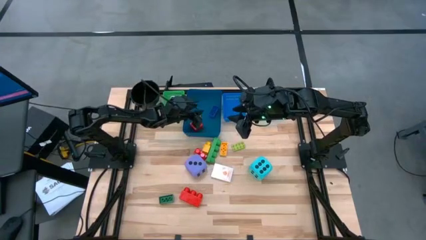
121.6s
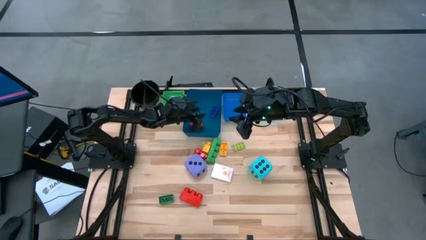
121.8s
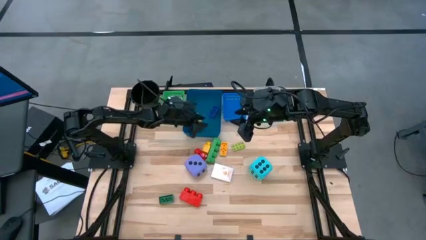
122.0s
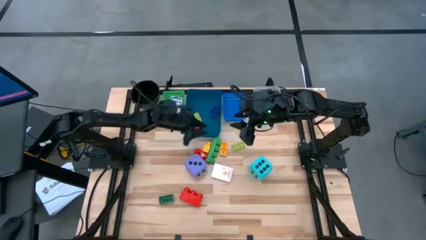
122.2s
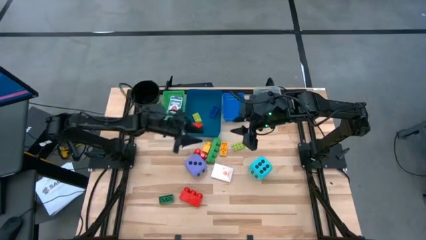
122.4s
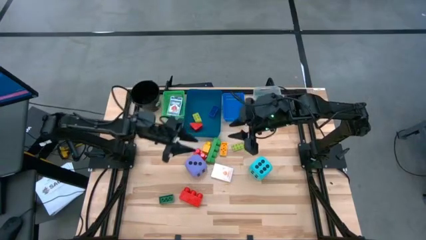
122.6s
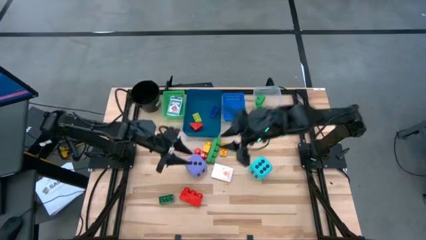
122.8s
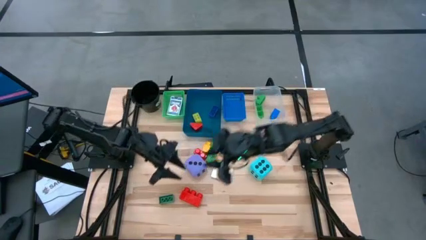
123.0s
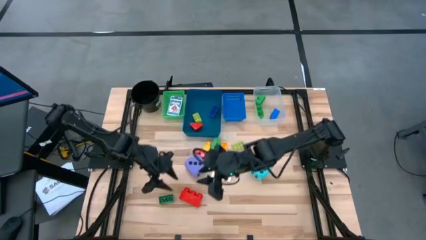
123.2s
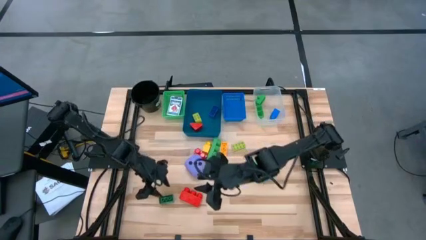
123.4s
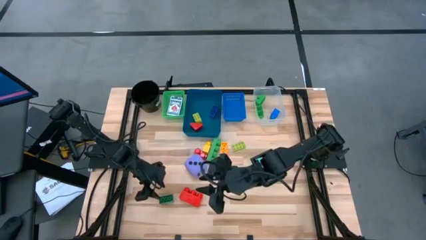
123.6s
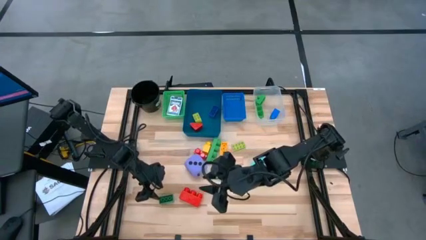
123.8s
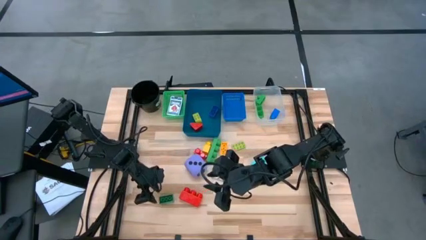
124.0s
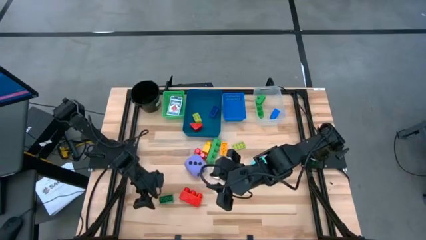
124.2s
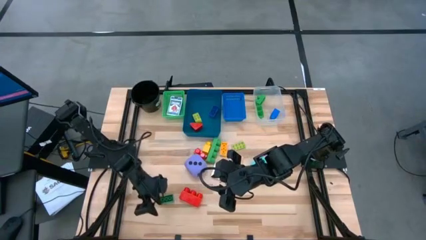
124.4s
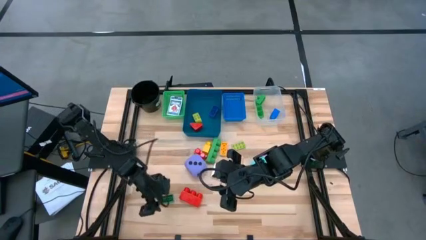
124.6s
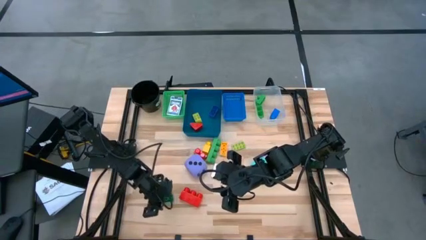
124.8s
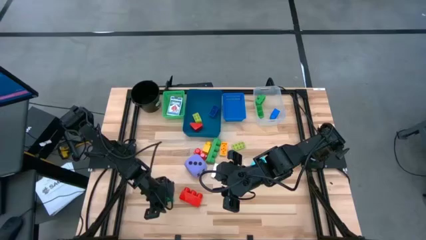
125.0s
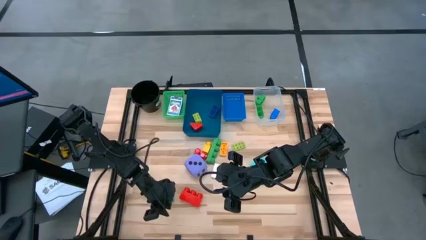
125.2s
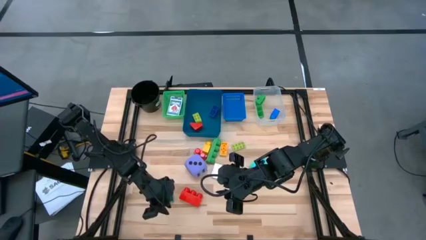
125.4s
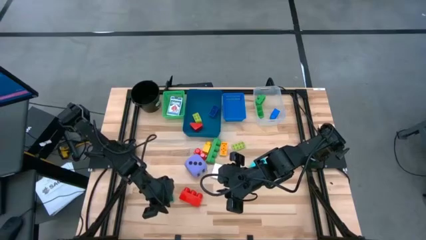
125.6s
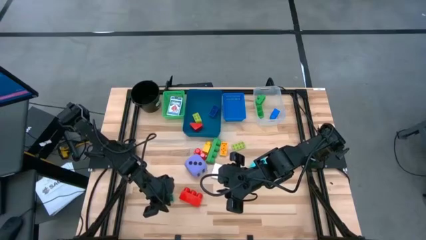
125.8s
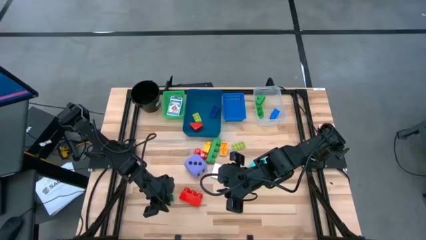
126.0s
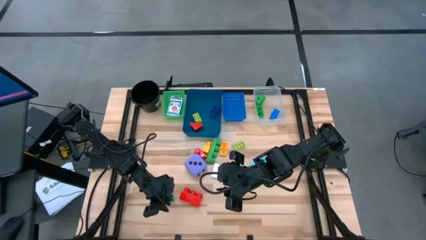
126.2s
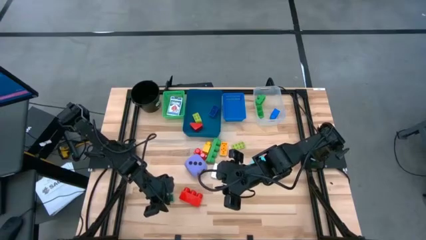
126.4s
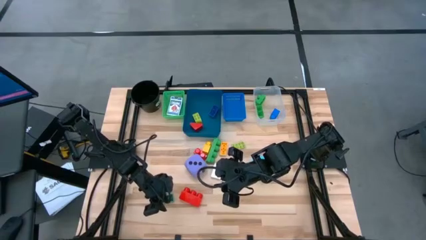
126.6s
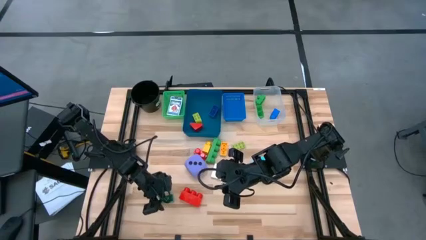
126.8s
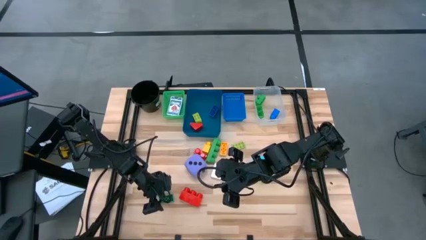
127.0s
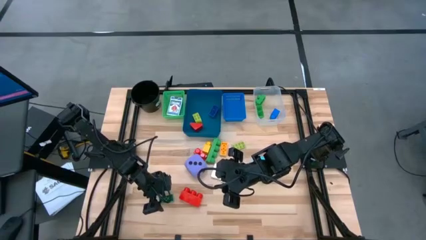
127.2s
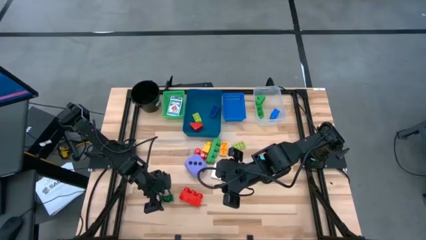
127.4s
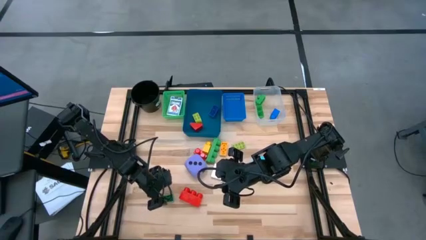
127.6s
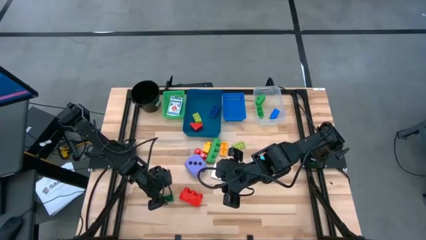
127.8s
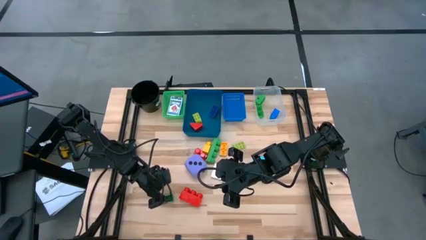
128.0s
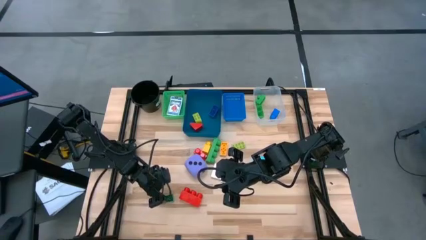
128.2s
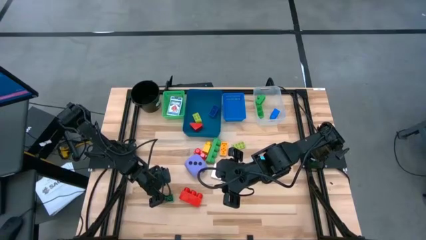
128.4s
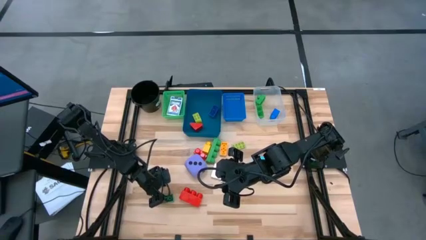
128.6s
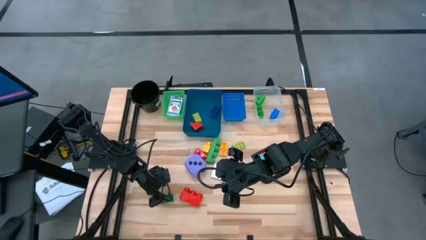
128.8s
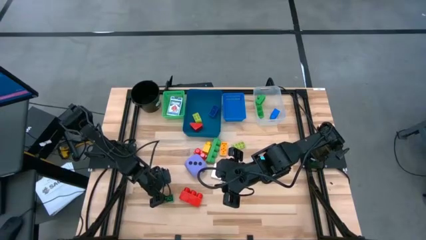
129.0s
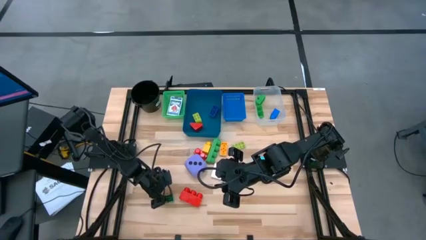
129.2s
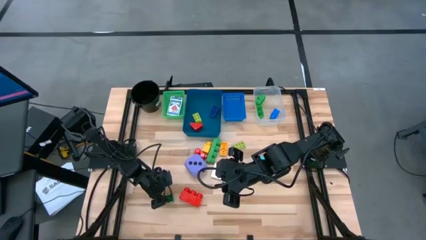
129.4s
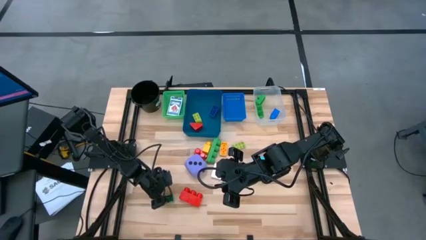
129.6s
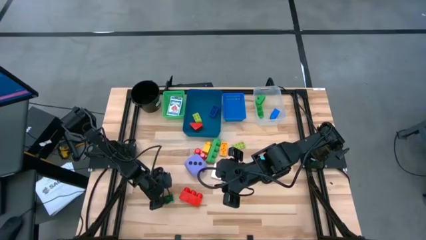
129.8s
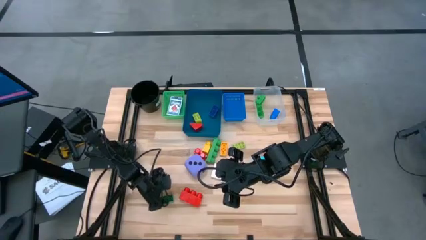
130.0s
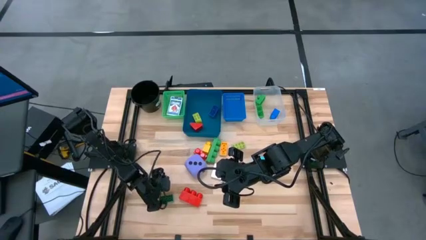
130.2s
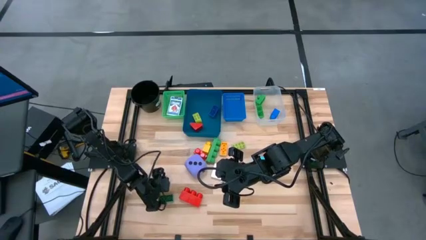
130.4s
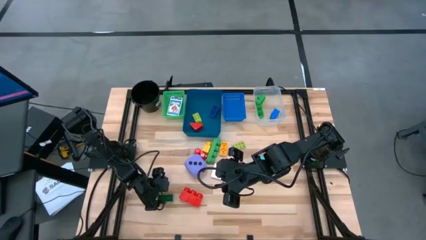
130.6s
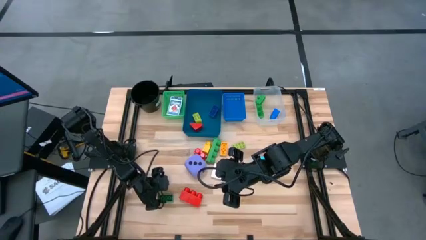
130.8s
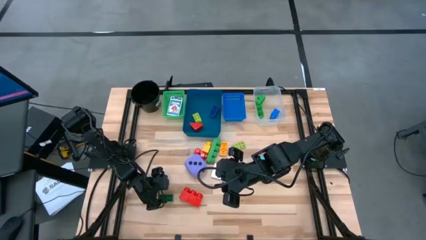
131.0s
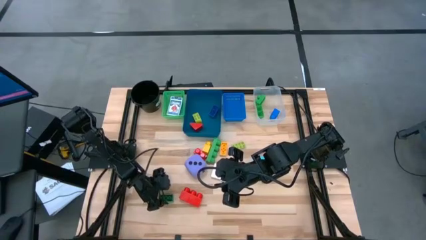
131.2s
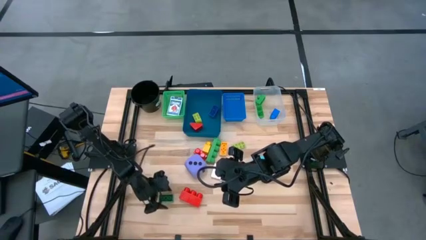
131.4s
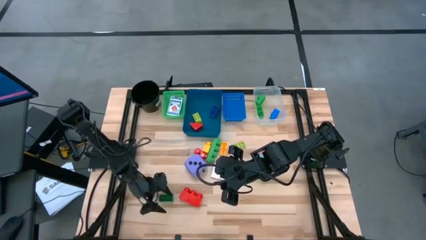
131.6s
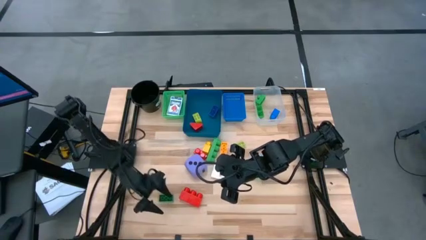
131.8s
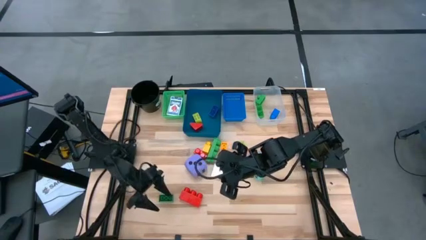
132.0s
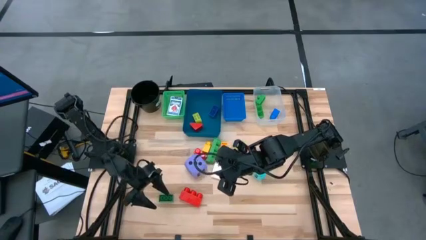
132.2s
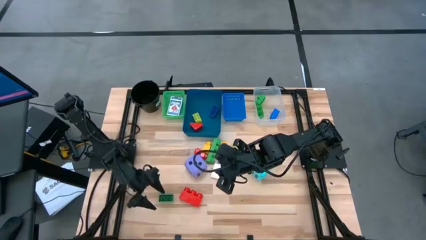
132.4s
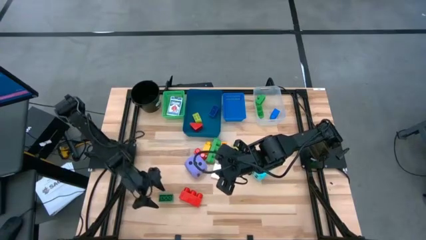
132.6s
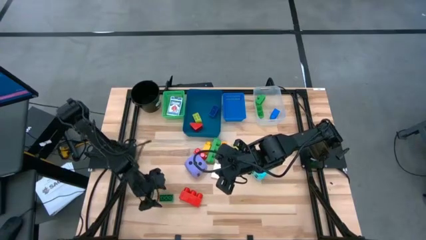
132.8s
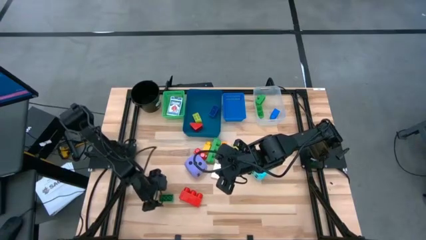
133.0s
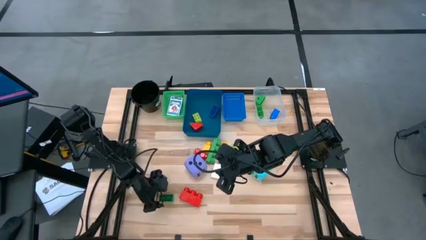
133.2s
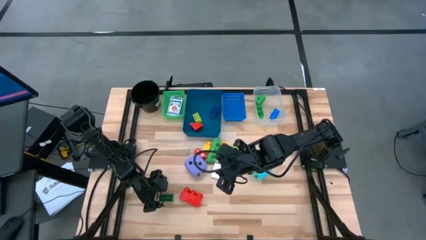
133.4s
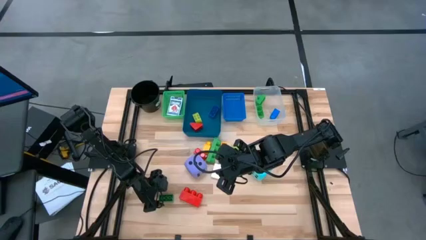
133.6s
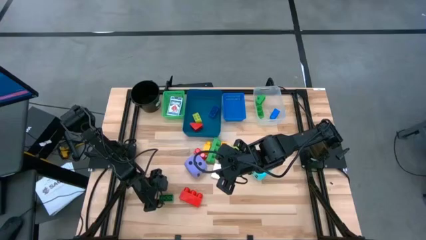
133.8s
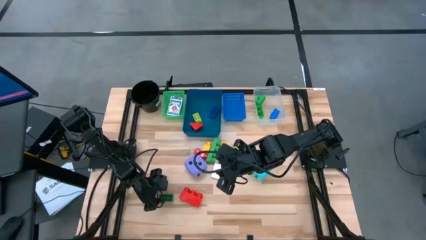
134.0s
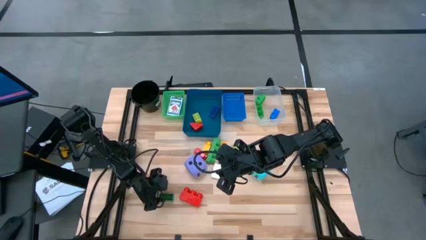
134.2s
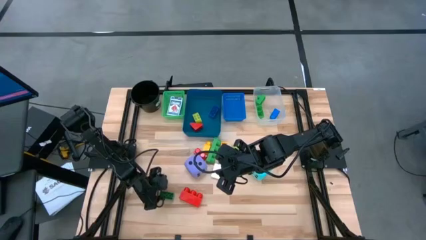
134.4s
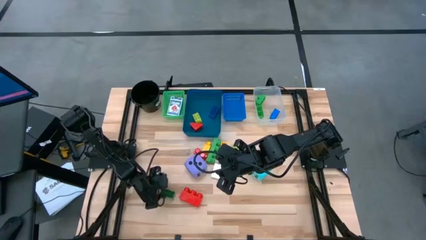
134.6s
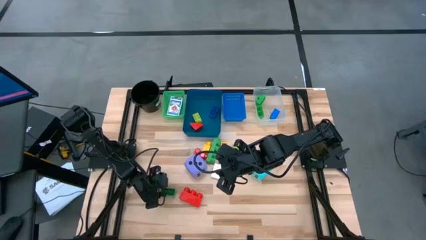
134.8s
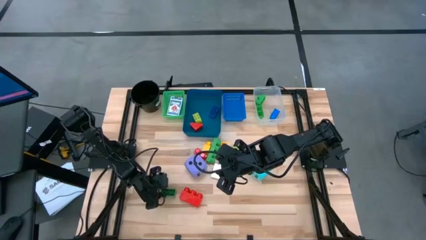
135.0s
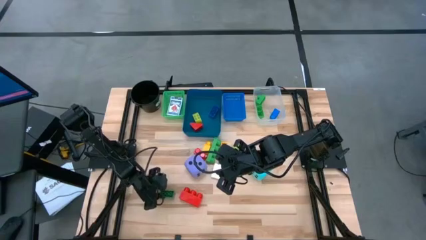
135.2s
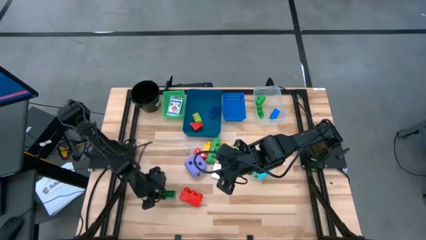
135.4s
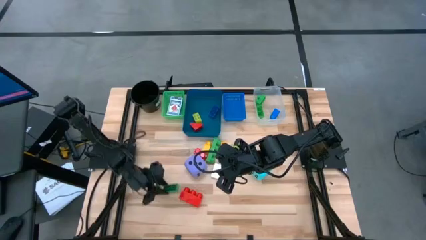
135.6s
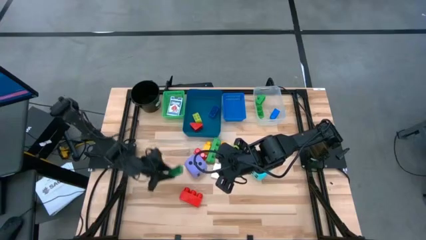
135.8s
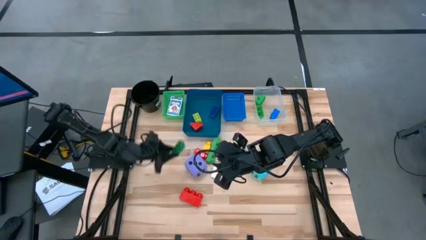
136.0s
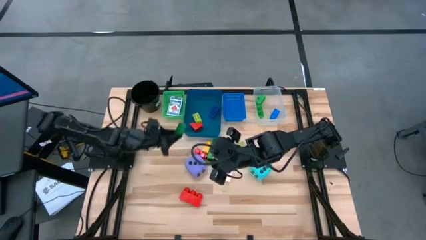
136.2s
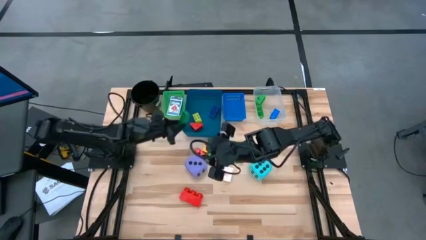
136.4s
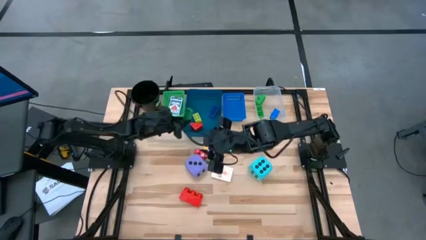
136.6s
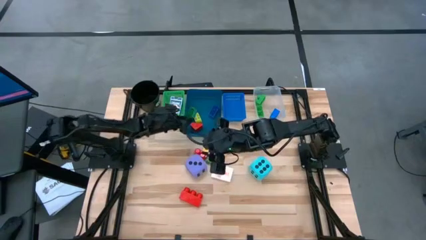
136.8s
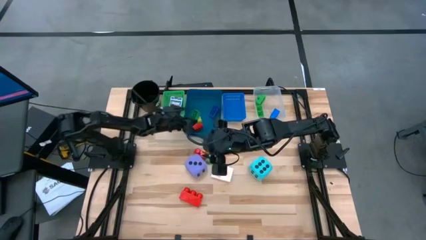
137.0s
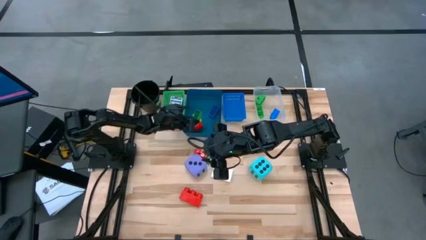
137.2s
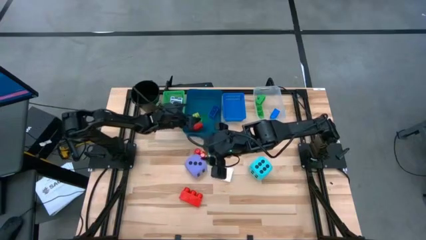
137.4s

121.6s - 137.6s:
Task: Pick & Place Toys
Put the small dark green game piece into the dark blue bin
